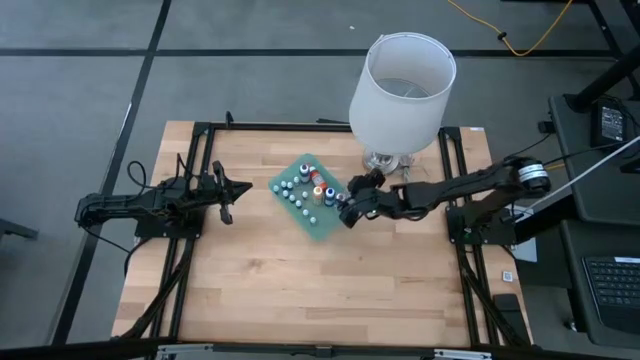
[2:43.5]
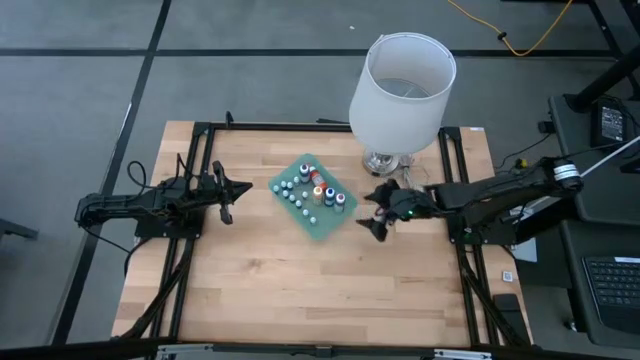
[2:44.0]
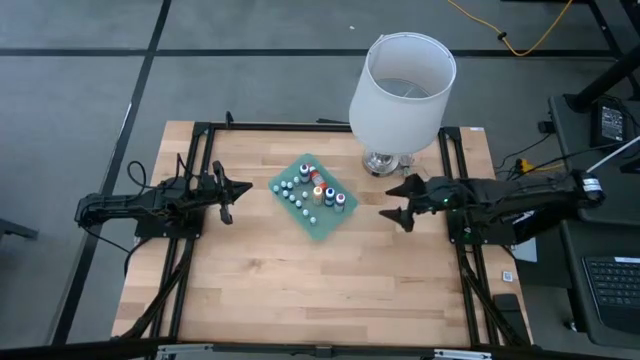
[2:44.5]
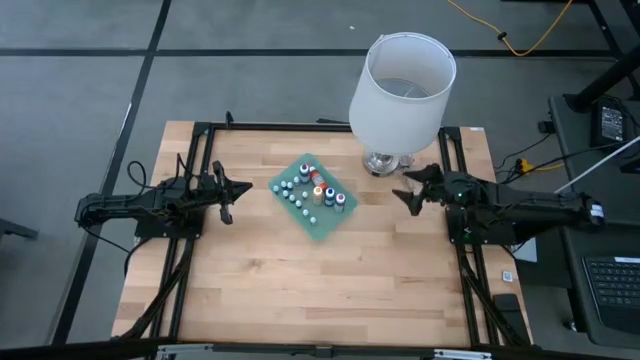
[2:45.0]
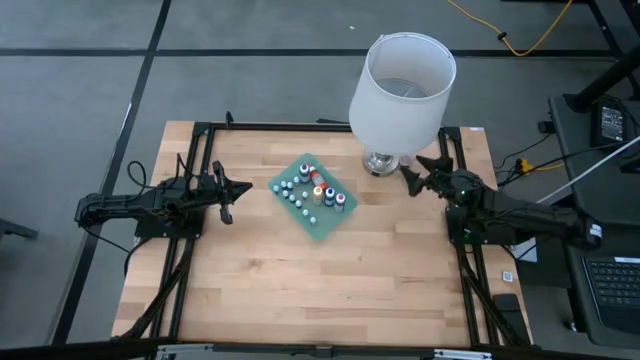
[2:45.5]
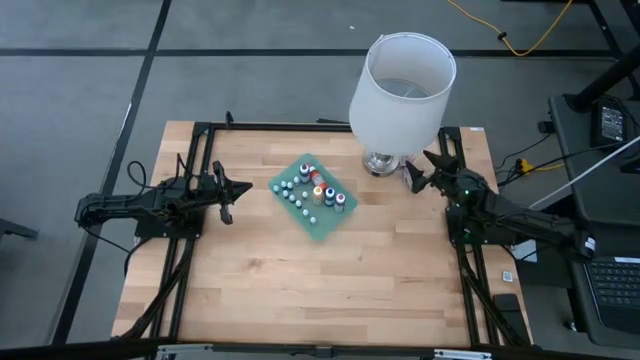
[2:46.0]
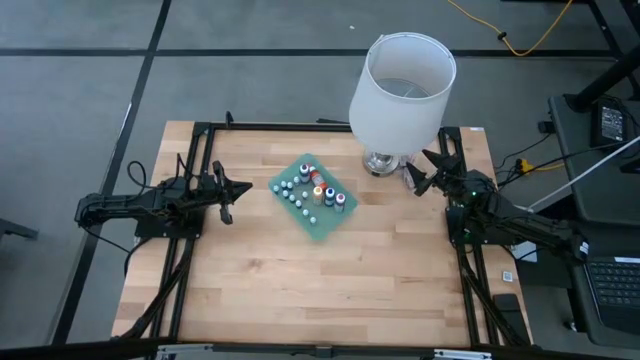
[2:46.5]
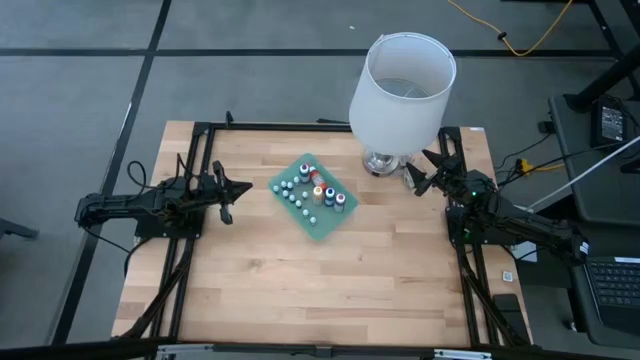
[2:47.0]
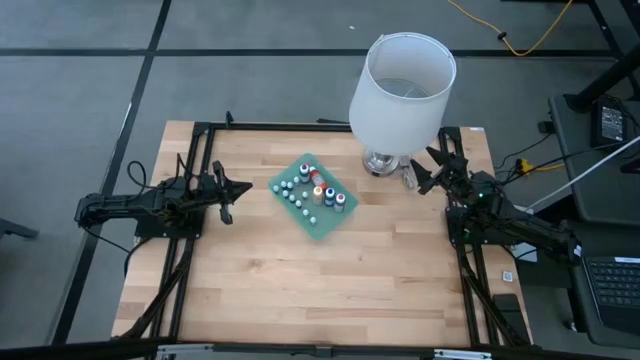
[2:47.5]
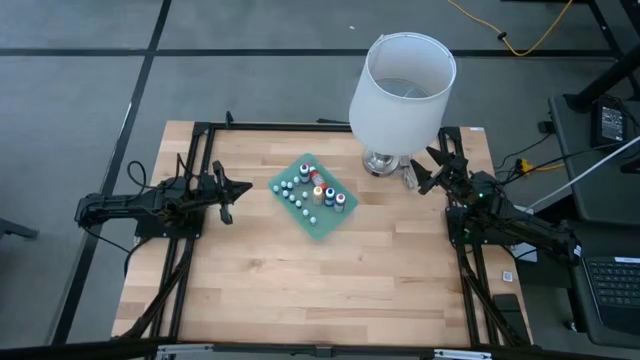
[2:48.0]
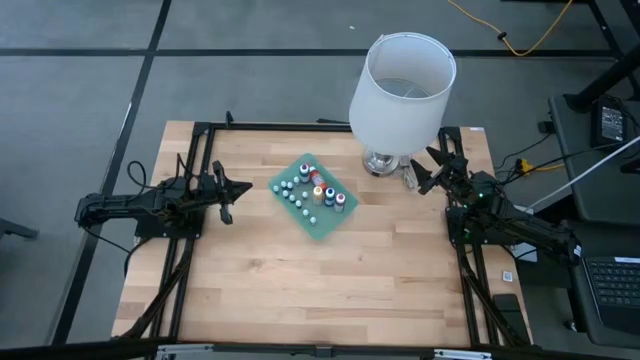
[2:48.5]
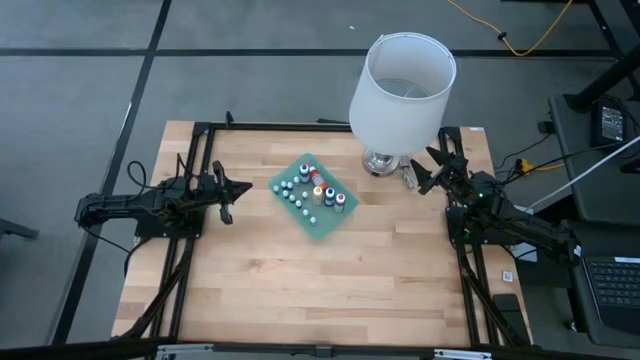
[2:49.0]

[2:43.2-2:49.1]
Task: Pick & Place food coloring
Return to Home Position

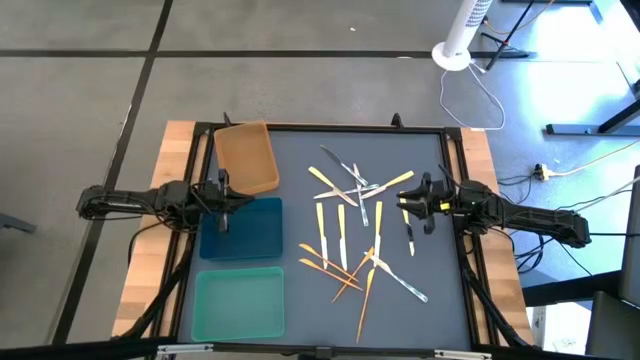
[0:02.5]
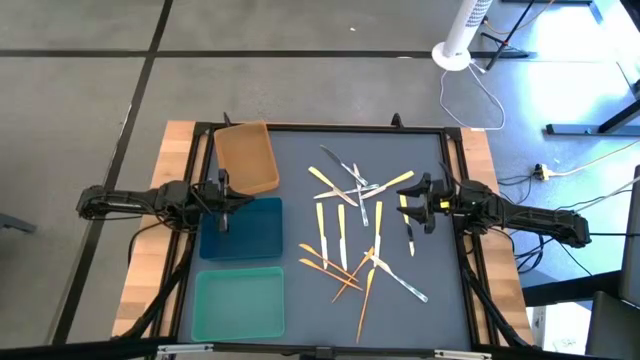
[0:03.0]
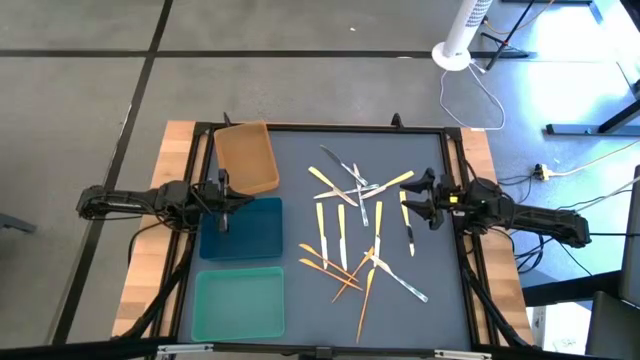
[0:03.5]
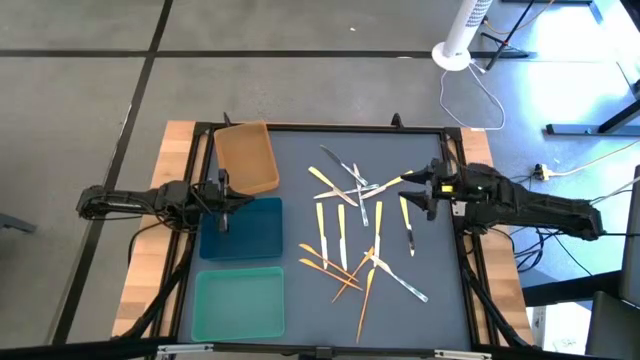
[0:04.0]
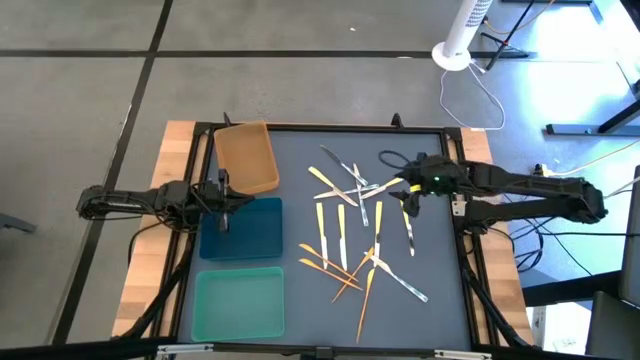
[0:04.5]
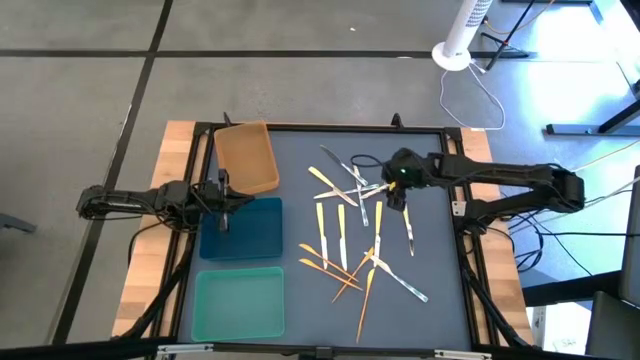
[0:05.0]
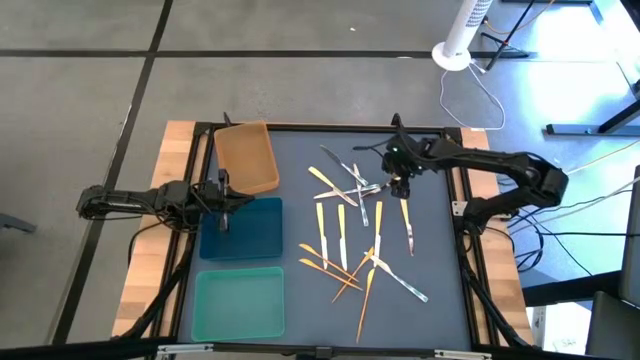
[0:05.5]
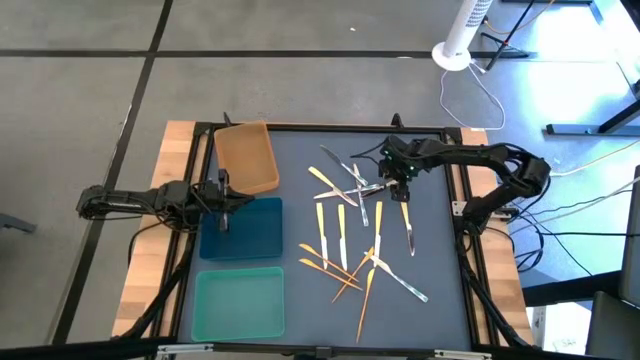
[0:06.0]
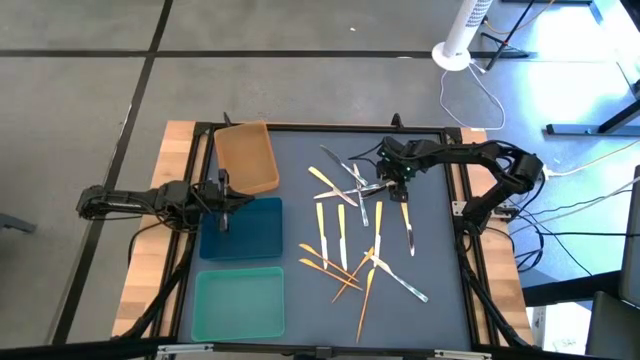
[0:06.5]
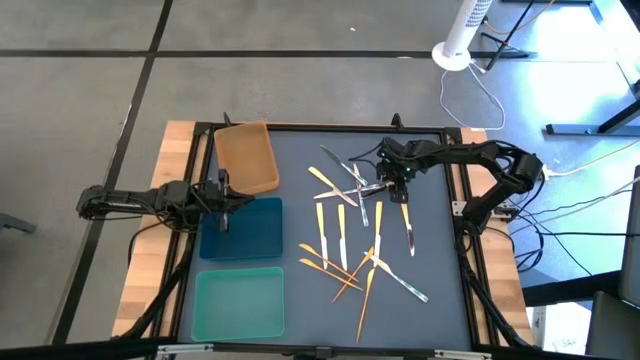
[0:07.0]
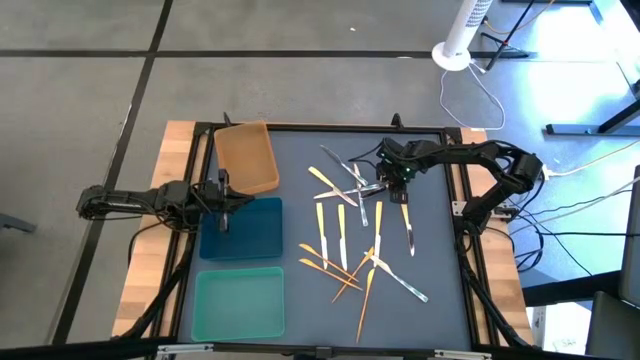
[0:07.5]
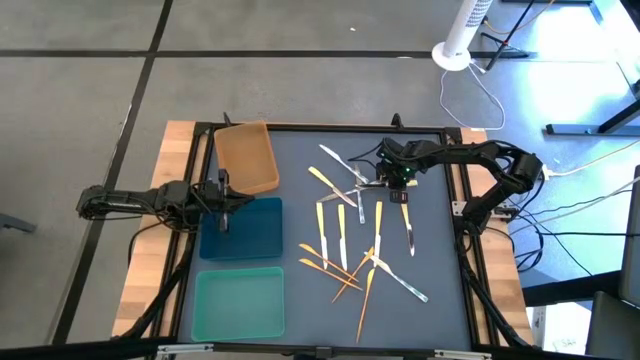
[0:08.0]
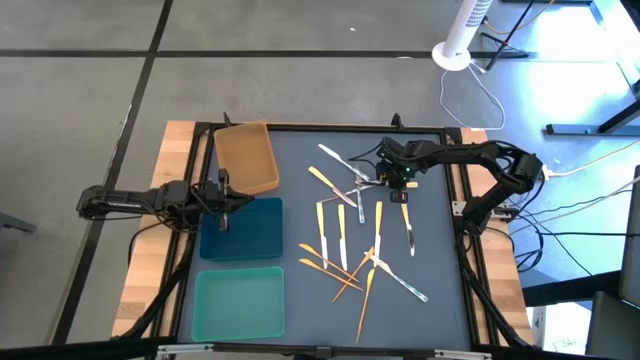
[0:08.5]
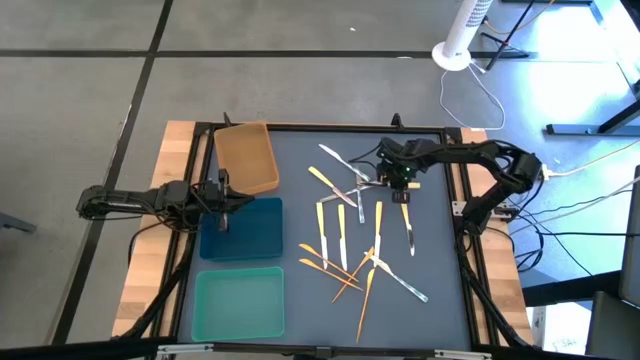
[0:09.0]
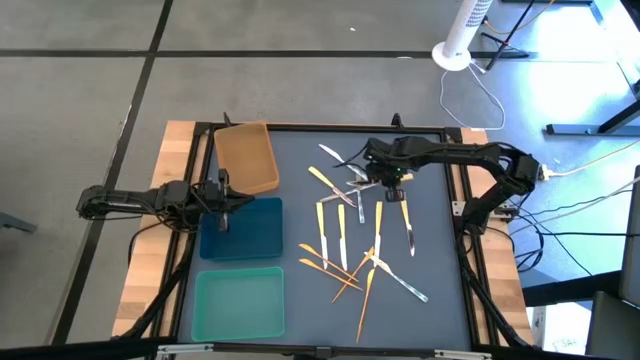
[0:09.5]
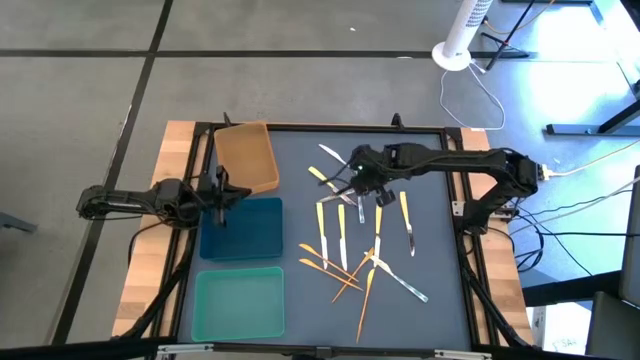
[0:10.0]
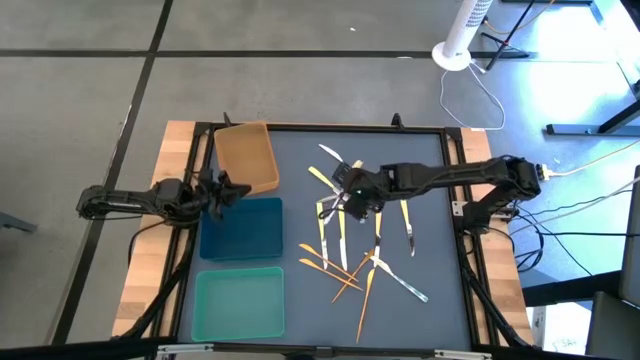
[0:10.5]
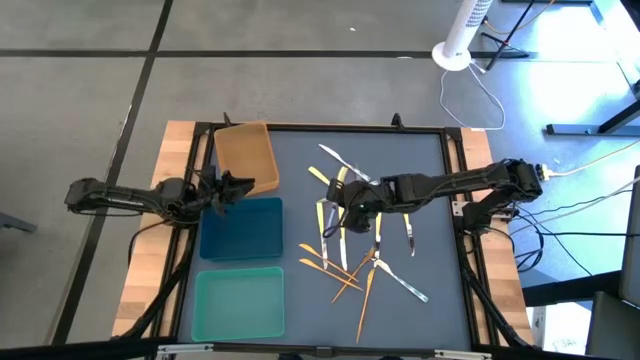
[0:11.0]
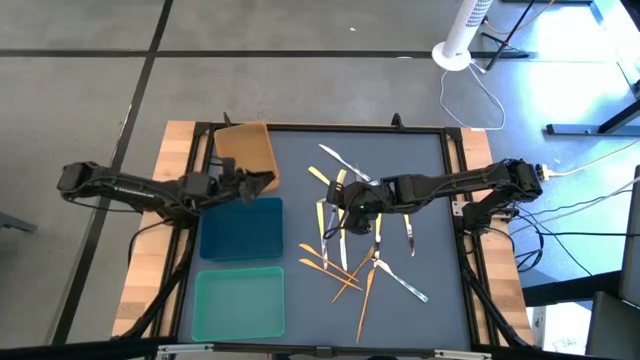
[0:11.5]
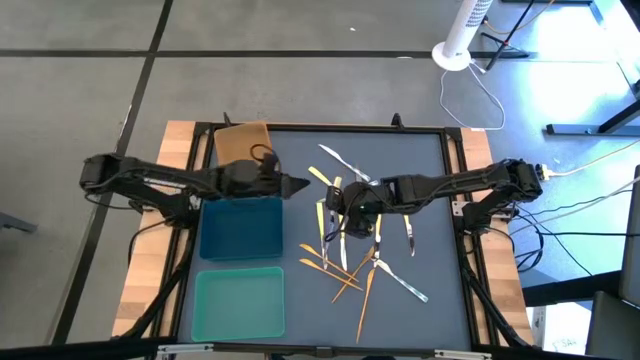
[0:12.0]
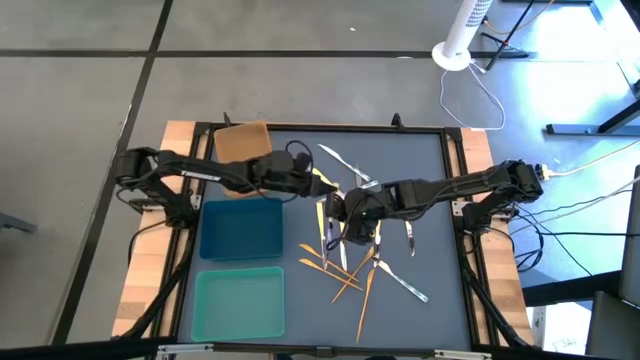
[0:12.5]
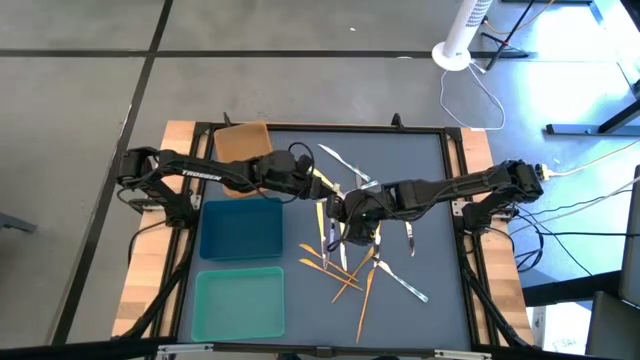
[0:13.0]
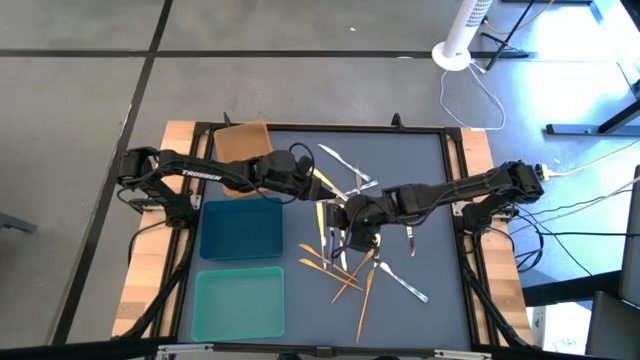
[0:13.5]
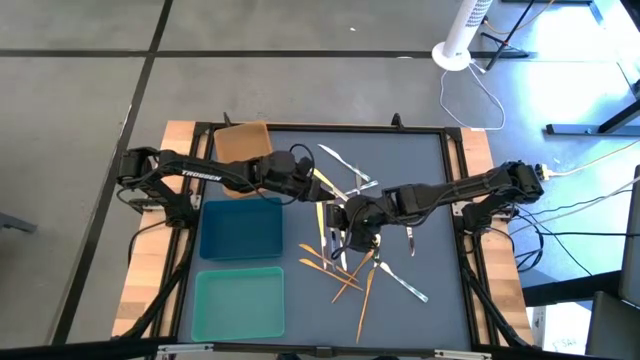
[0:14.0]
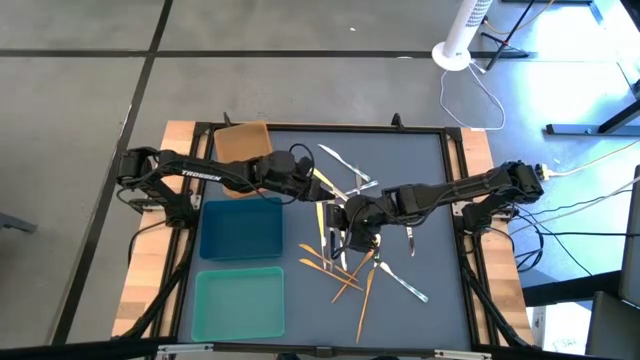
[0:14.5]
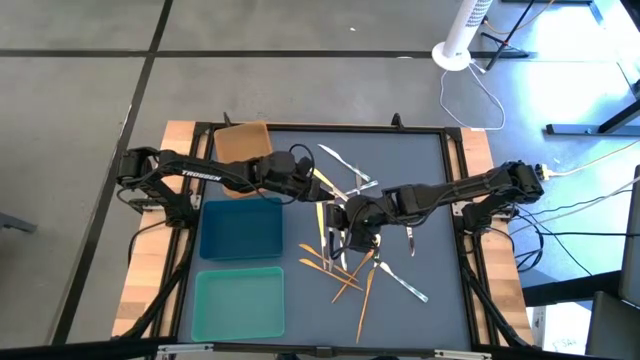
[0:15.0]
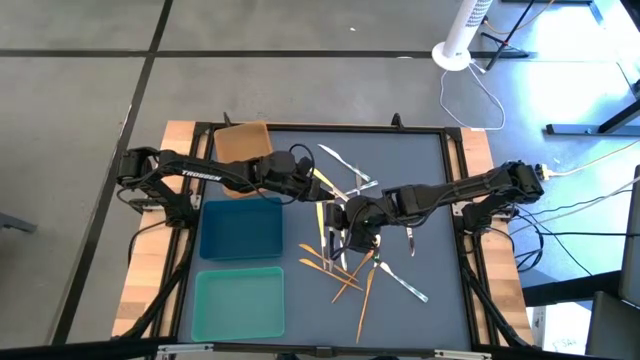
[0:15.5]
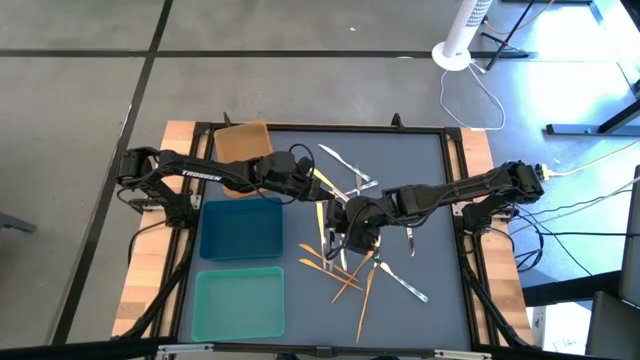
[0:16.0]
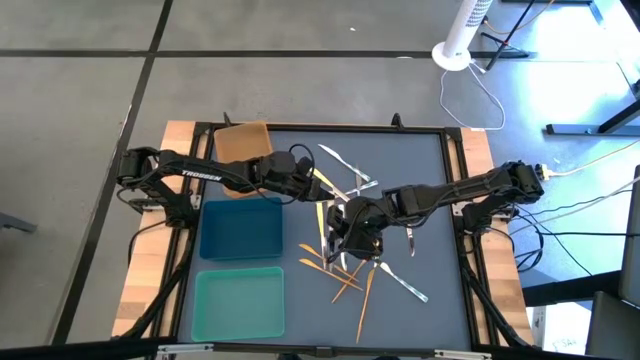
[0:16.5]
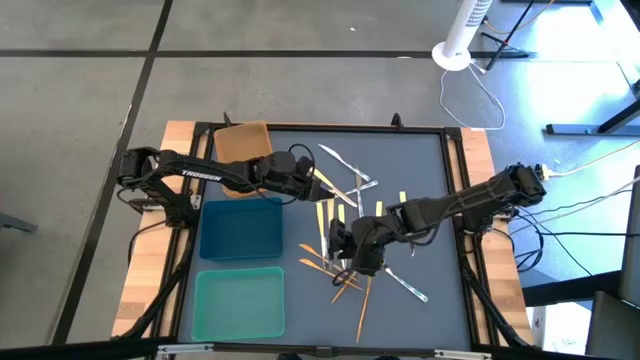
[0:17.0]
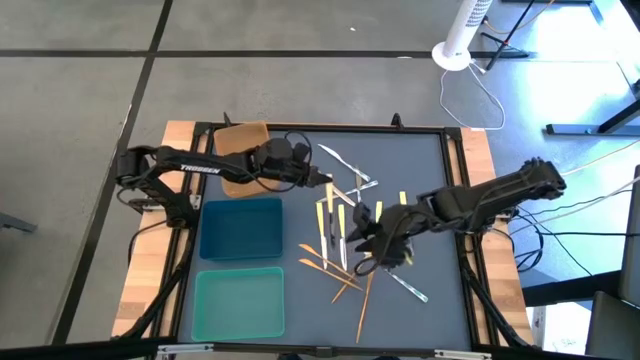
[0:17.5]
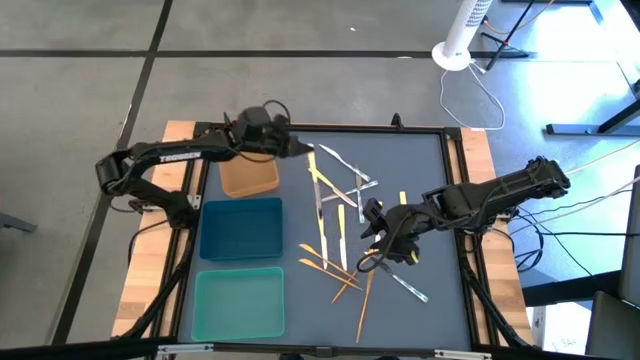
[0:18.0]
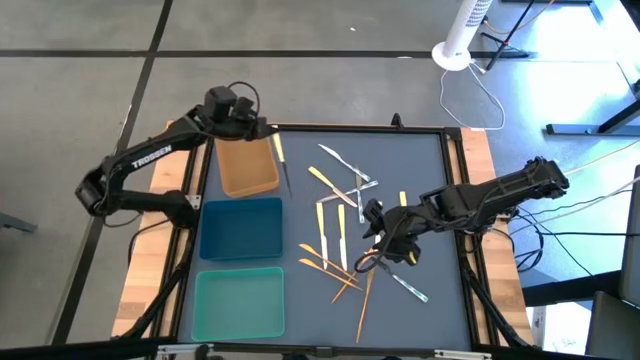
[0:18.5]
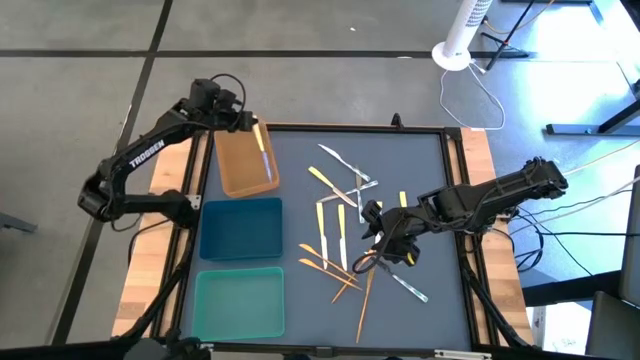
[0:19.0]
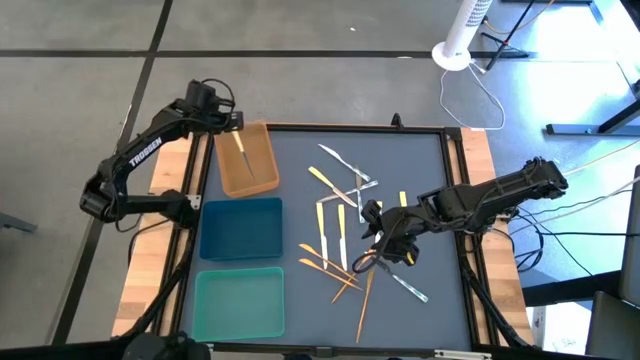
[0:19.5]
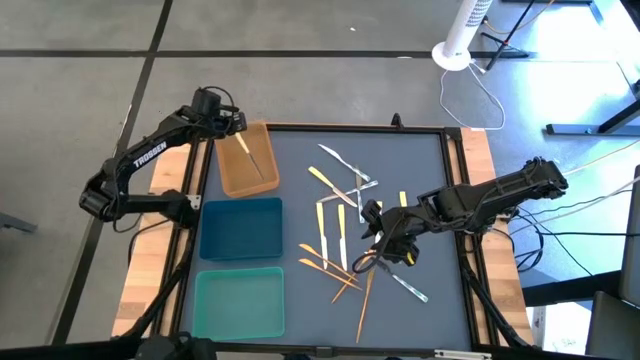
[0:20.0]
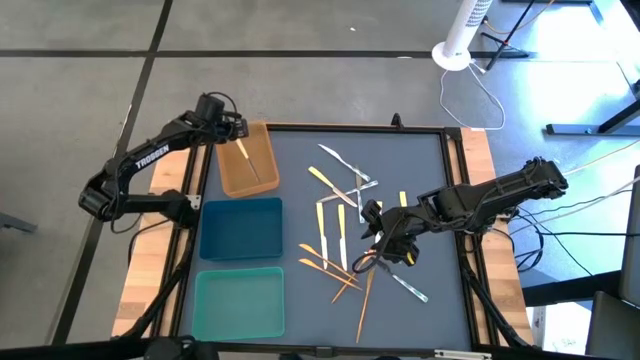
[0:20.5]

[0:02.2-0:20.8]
Task: Sort silverware by color (type)
Put the yellow knife into the orange bin
